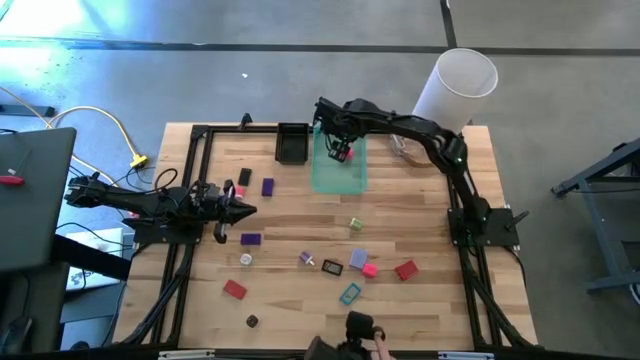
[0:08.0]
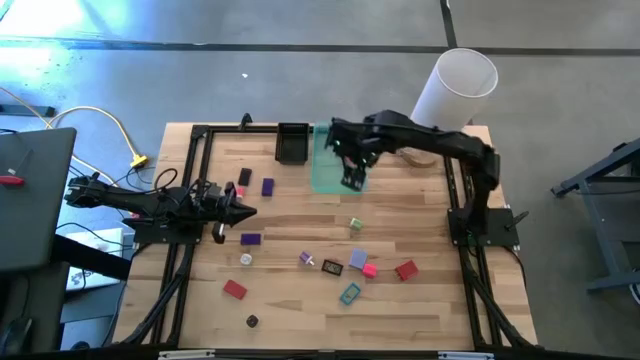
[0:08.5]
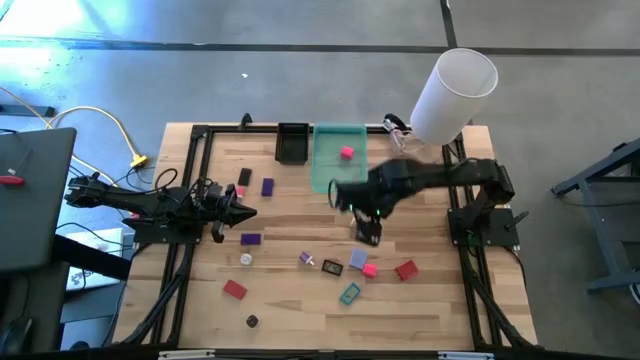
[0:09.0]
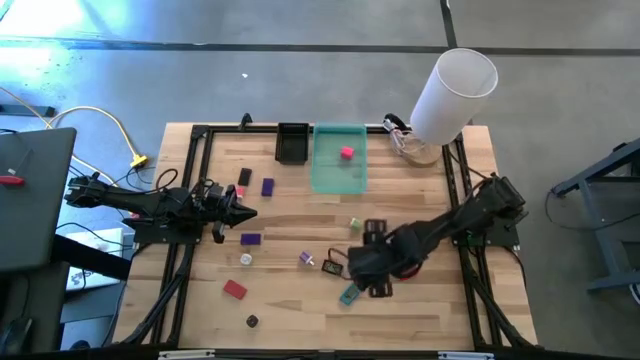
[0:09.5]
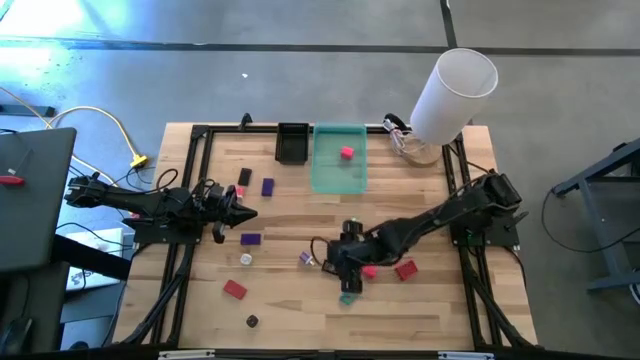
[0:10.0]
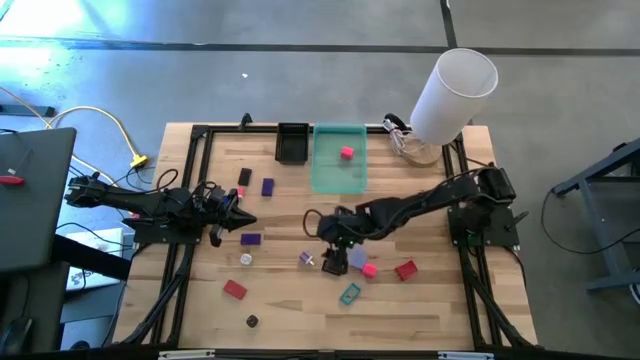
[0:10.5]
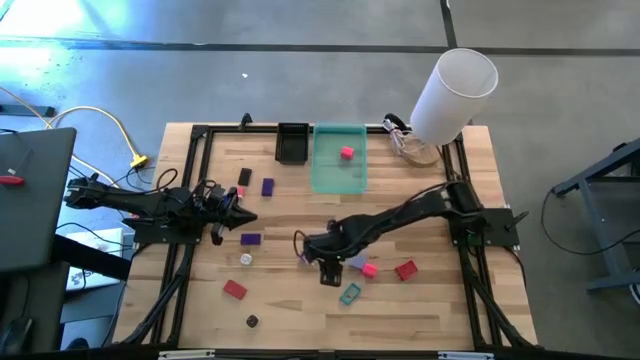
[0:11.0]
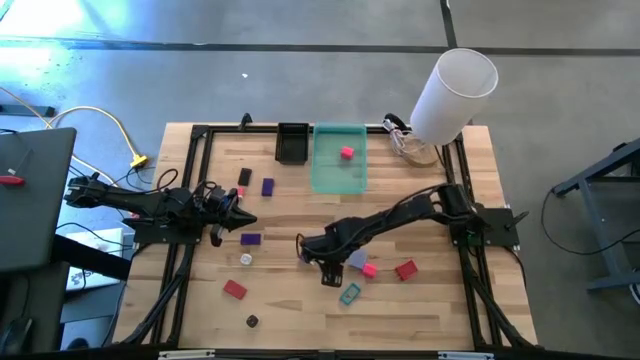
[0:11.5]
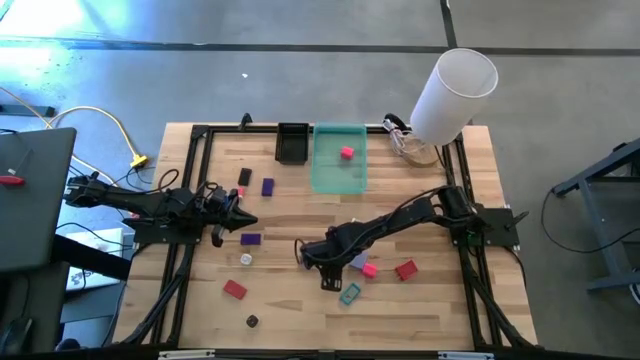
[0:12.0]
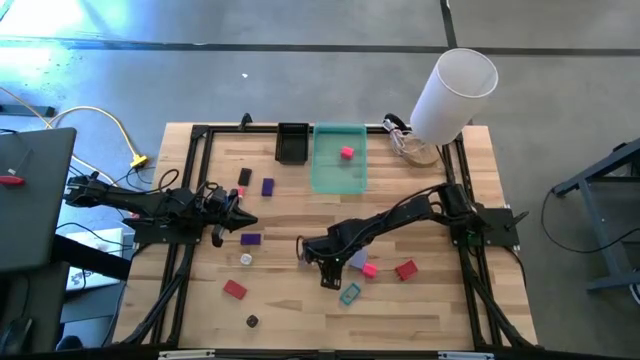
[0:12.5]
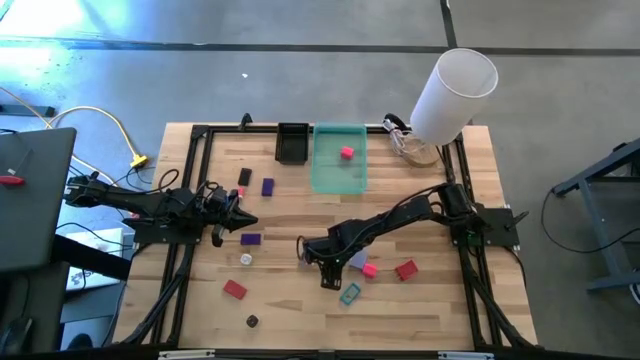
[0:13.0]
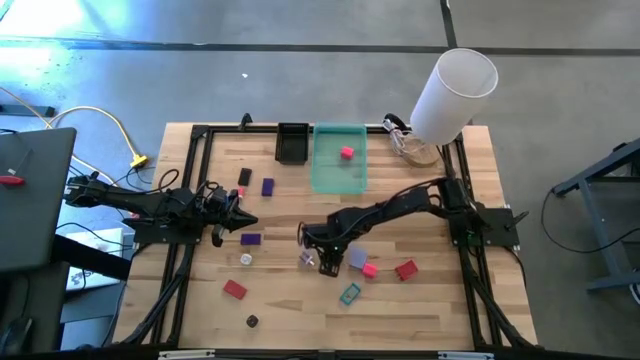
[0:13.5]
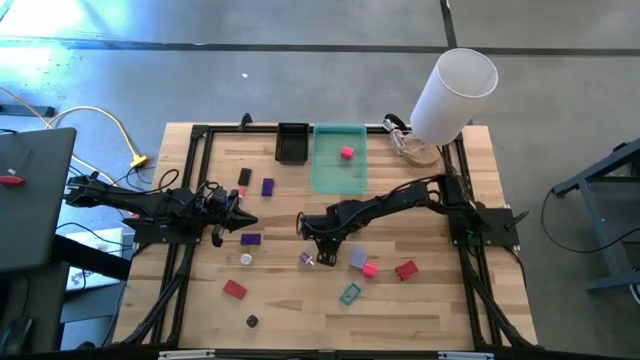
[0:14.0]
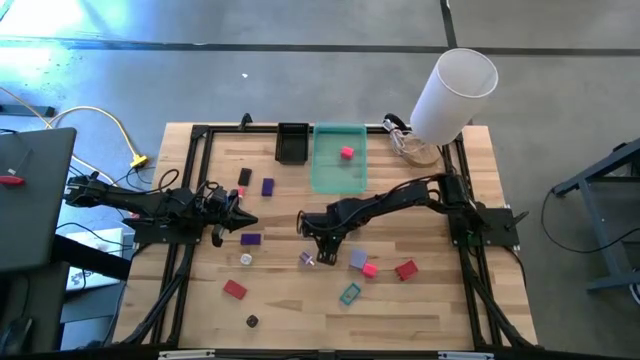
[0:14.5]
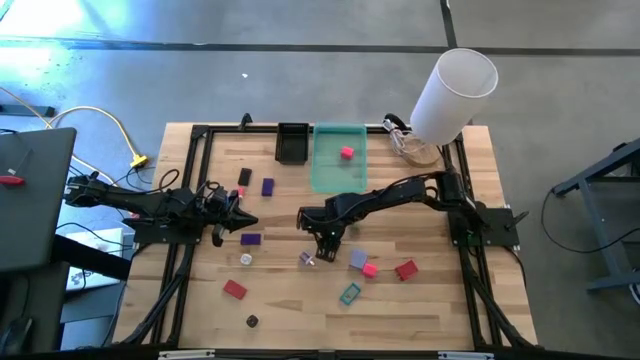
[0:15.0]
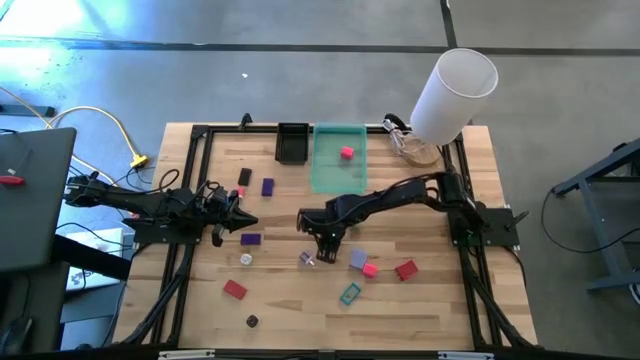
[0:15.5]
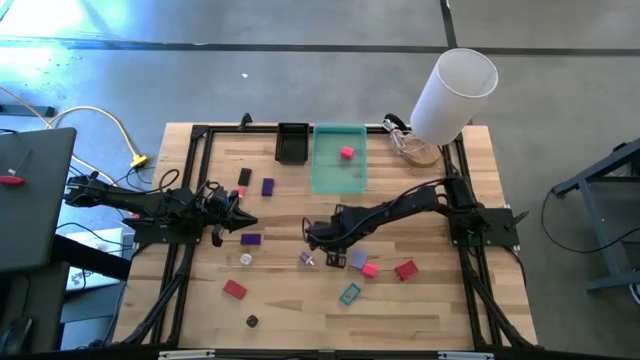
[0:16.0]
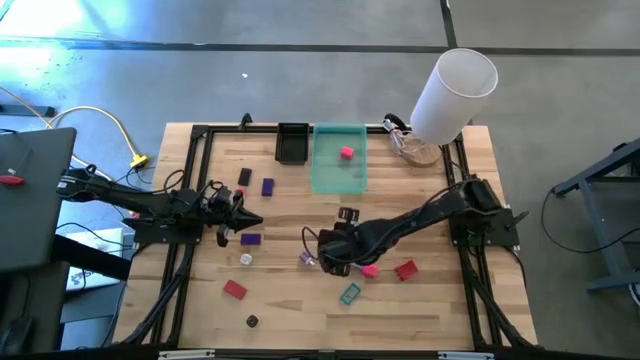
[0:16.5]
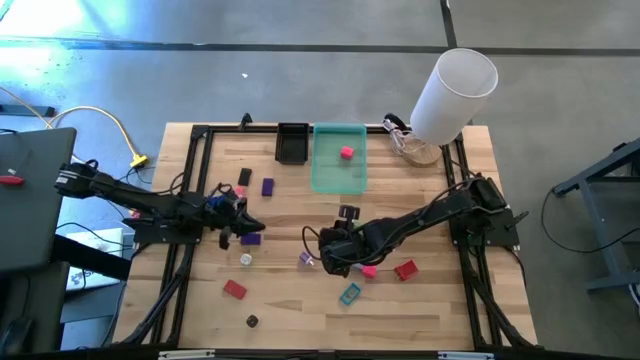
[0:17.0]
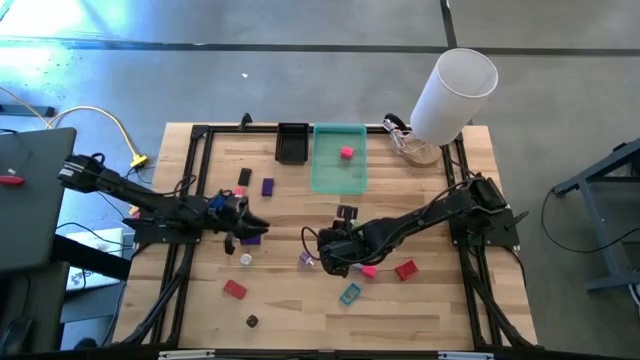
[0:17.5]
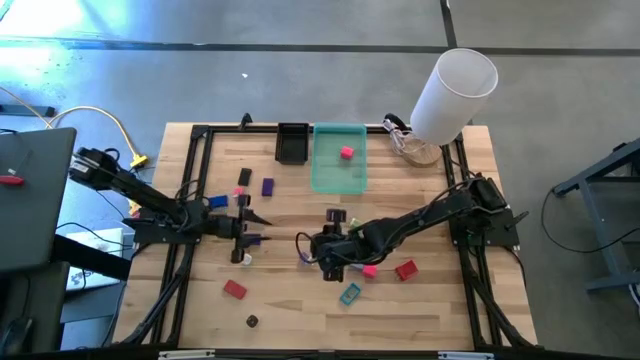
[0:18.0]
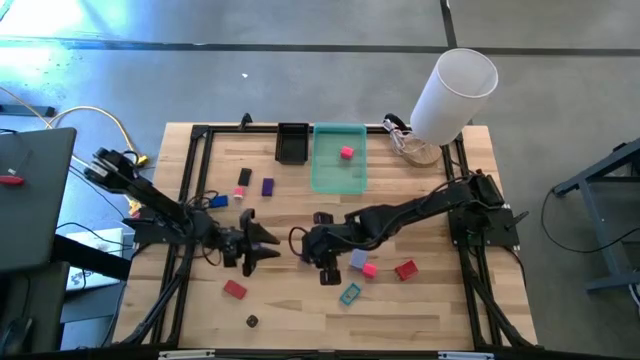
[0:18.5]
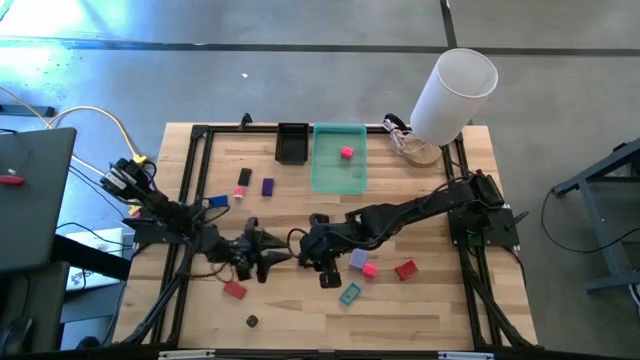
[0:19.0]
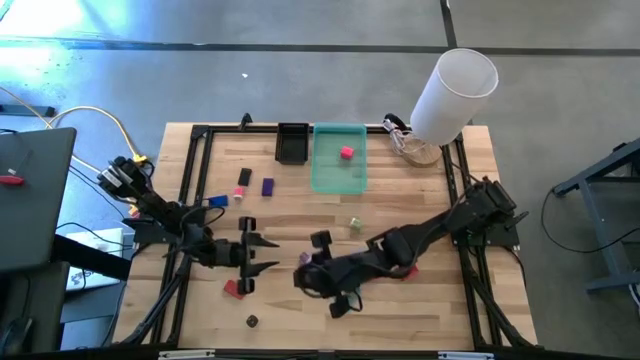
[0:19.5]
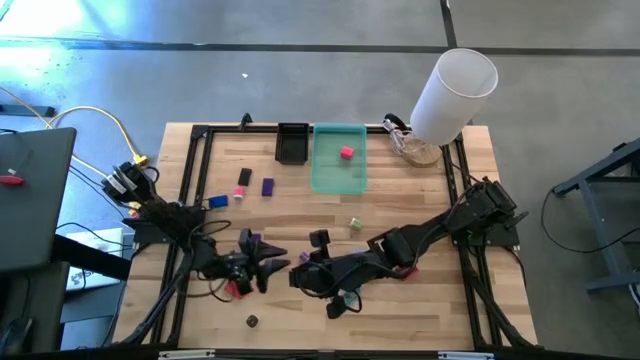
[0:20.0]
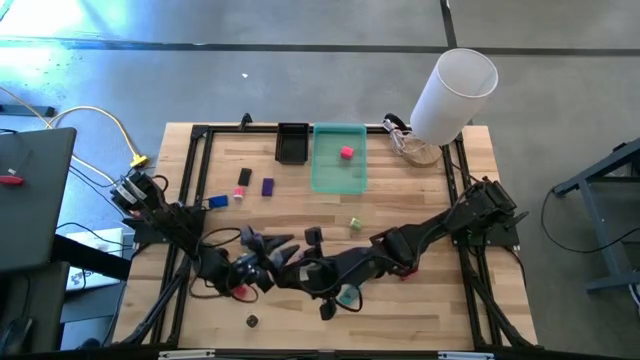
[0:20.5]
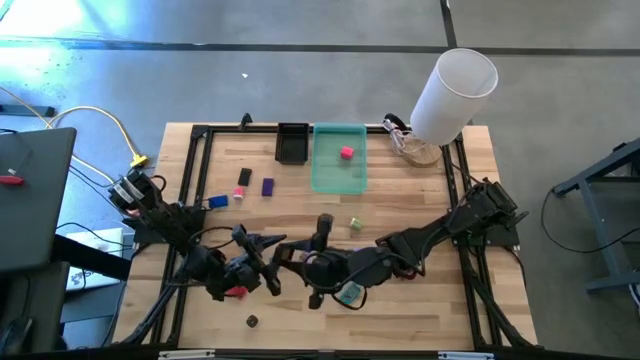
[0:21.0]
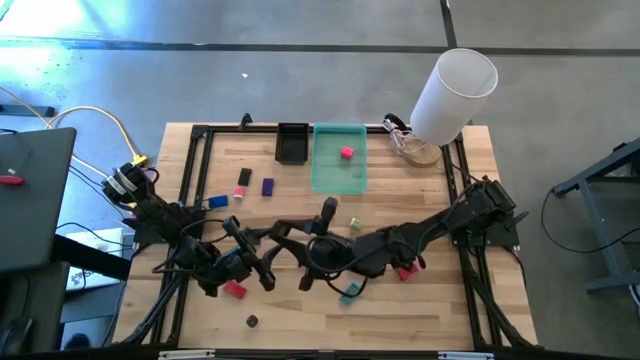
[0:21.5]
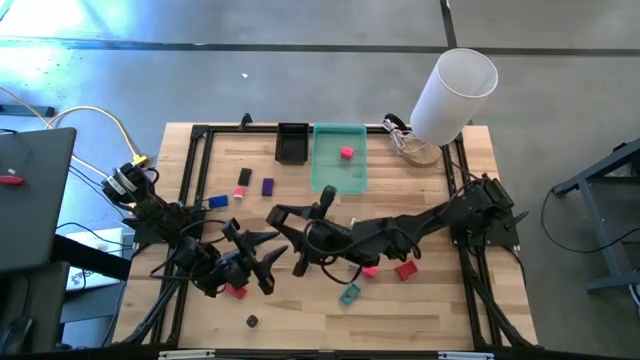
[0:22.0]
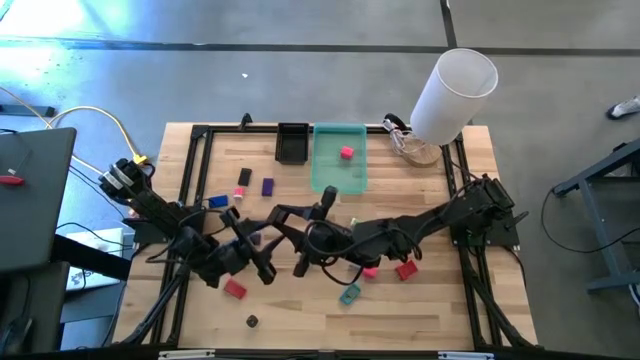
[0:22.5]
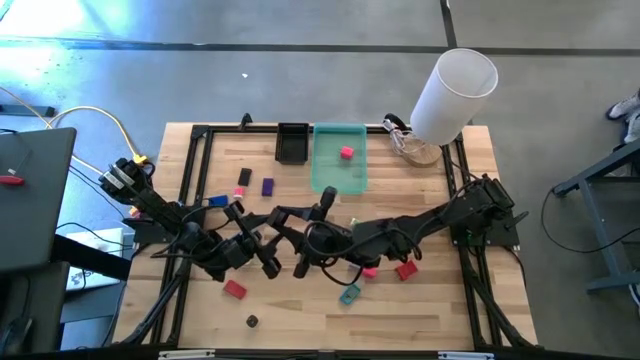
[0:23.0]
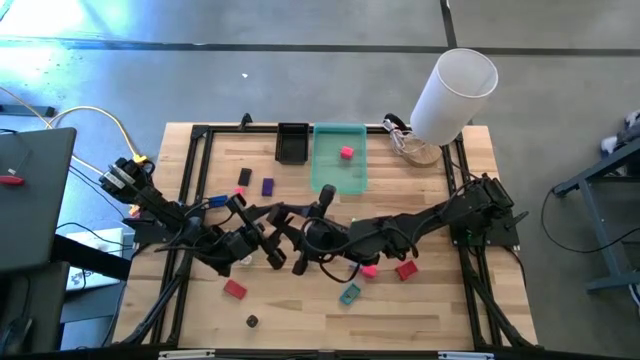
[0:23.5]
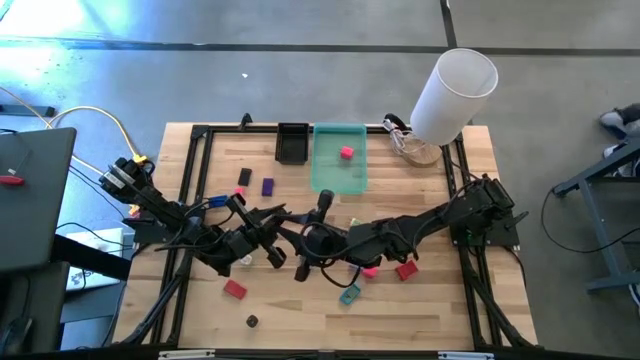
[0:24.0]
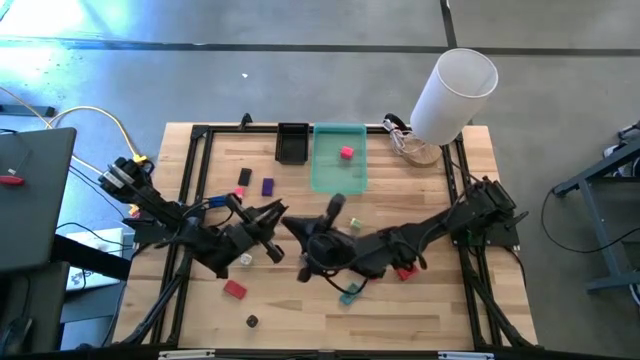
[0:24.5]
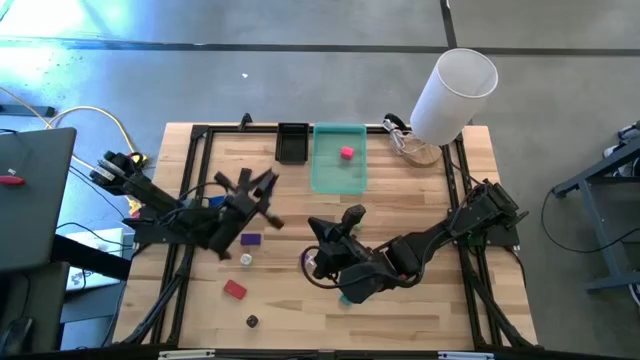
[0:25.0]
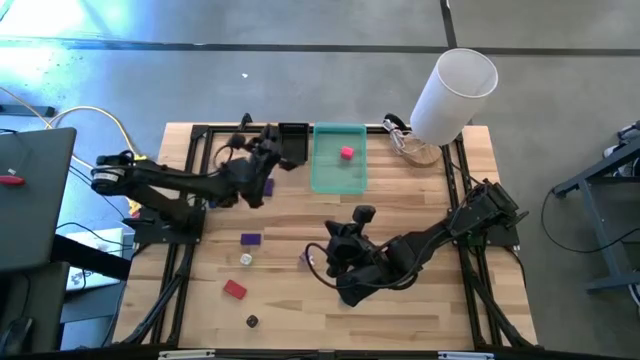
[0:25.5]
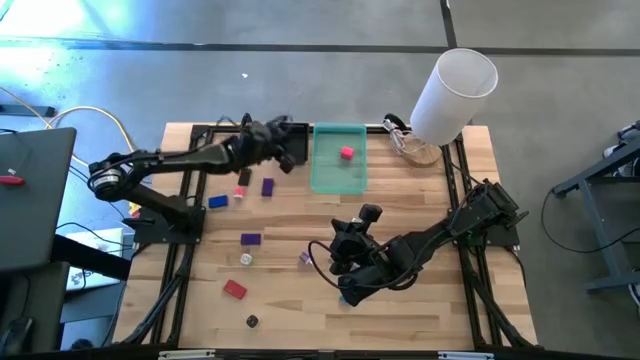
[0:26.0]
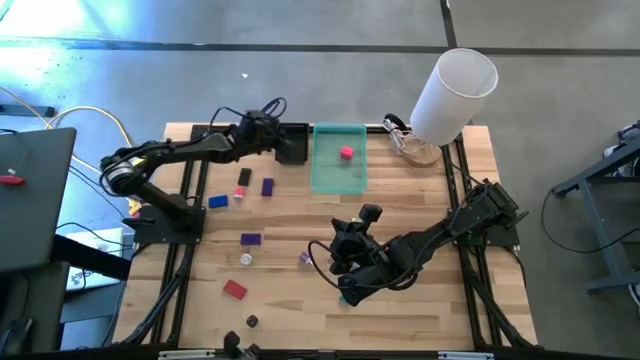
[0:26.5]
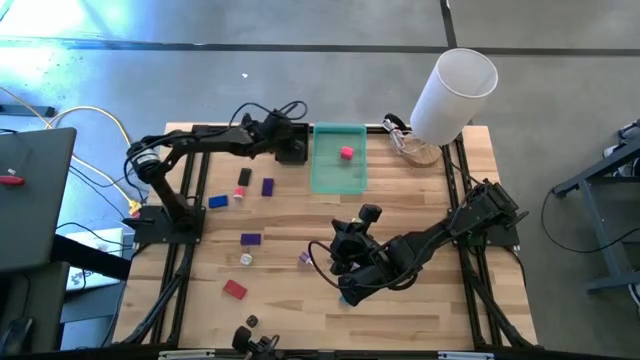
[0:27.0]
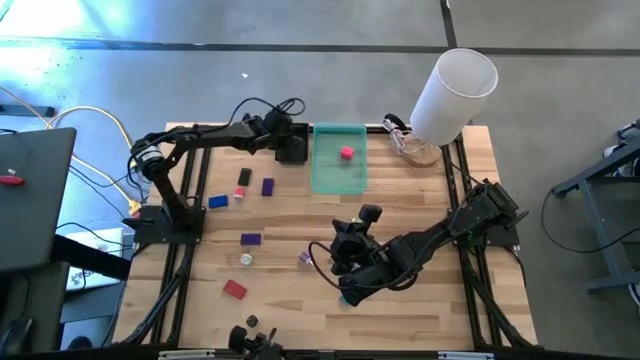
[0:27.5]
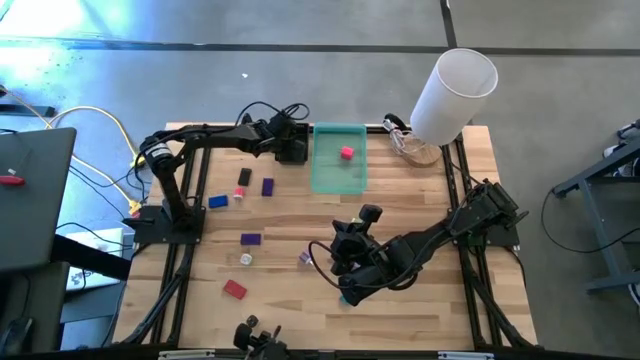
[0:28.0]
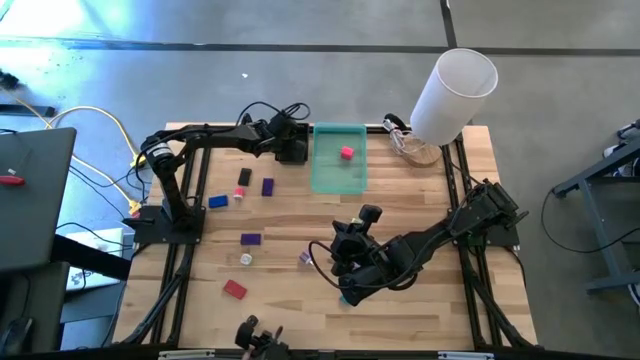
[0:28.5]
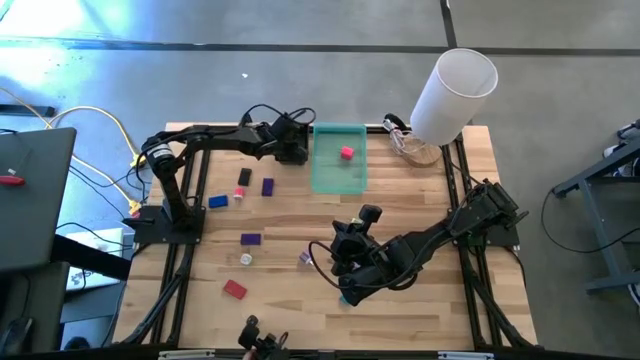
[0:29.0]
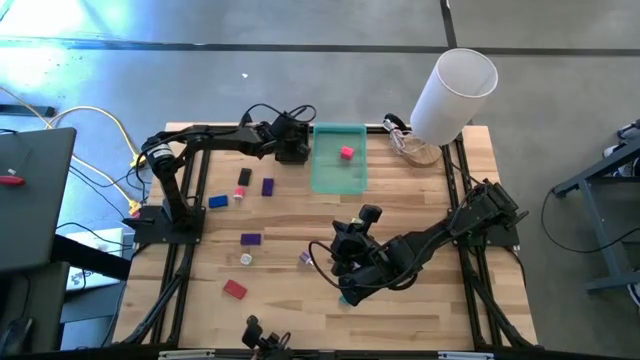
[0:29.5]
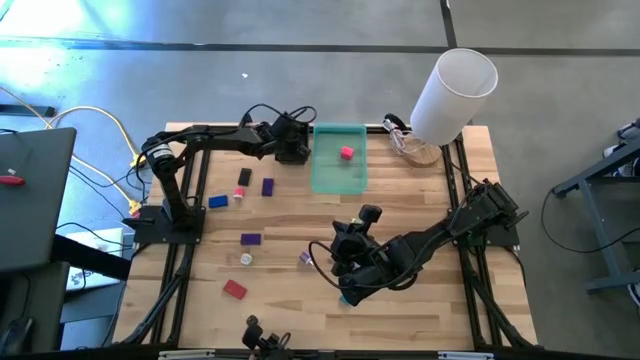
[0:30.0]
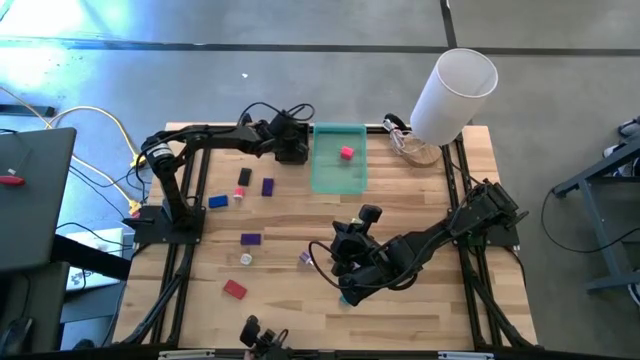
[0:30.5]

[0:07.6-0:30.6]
Task: Pick & Place Office items
Put the bottom black digital clock into the black bin
